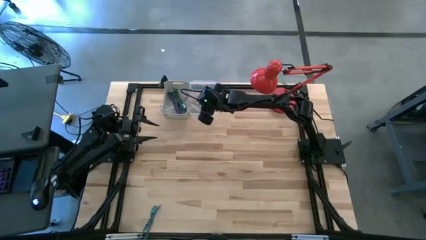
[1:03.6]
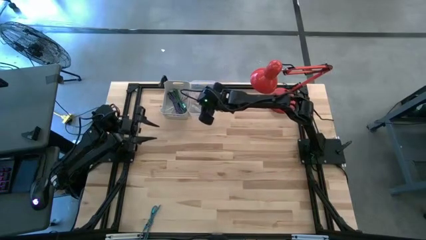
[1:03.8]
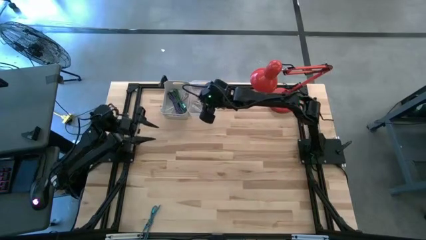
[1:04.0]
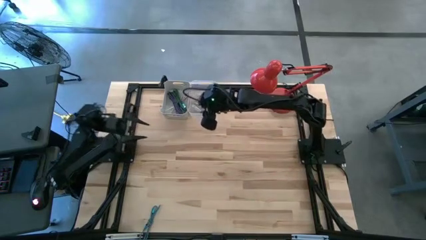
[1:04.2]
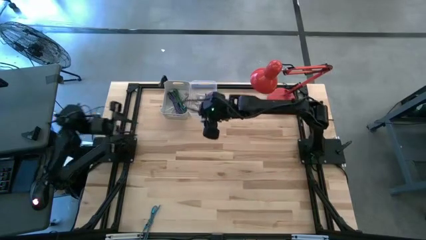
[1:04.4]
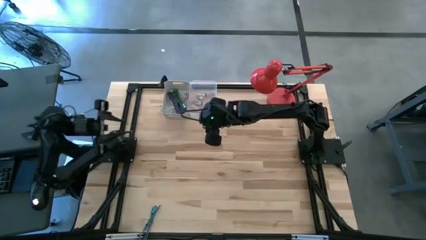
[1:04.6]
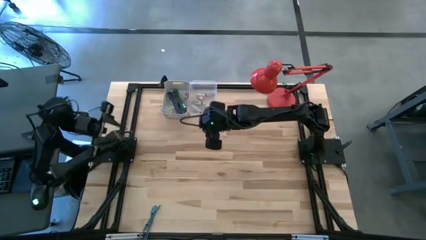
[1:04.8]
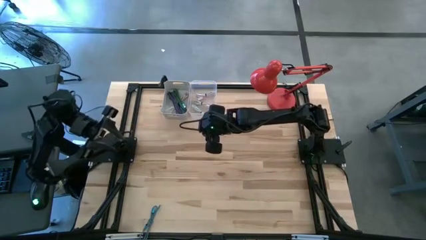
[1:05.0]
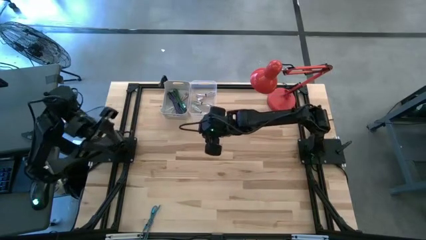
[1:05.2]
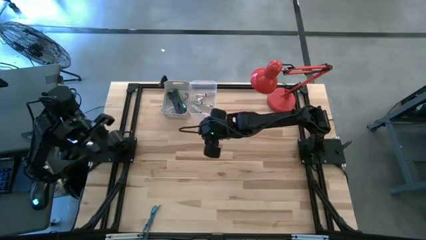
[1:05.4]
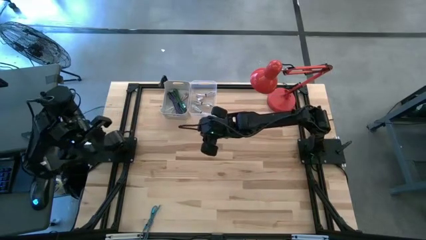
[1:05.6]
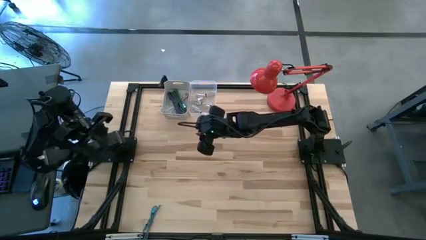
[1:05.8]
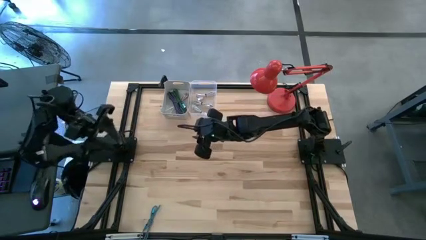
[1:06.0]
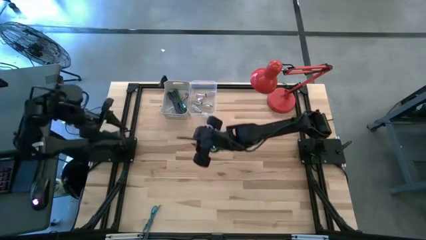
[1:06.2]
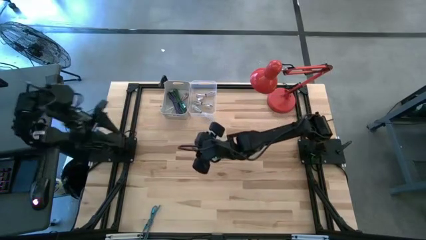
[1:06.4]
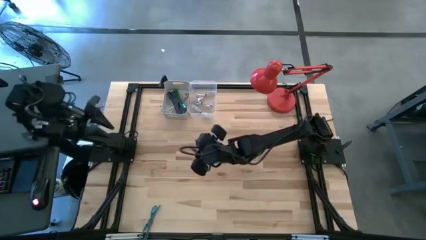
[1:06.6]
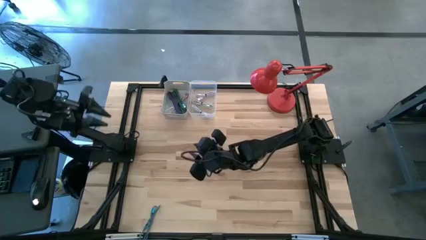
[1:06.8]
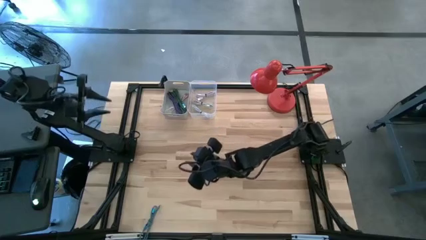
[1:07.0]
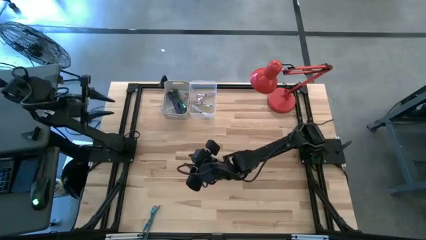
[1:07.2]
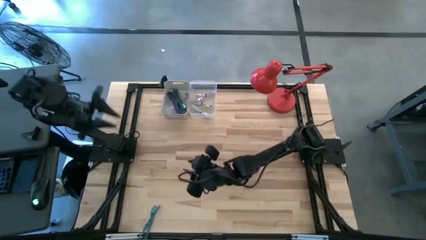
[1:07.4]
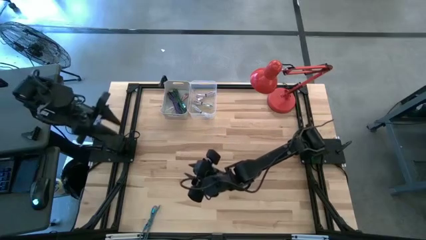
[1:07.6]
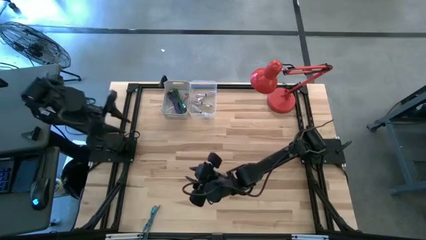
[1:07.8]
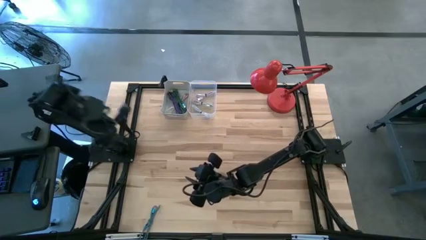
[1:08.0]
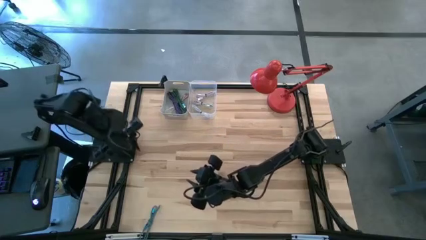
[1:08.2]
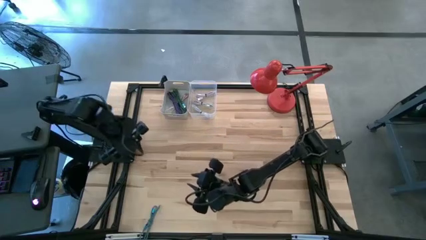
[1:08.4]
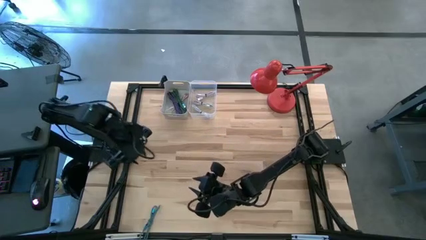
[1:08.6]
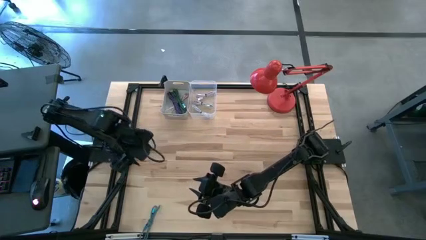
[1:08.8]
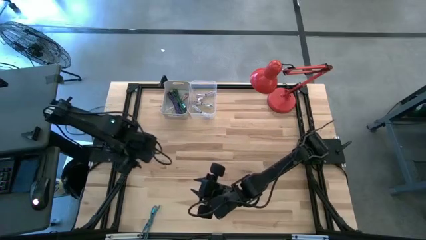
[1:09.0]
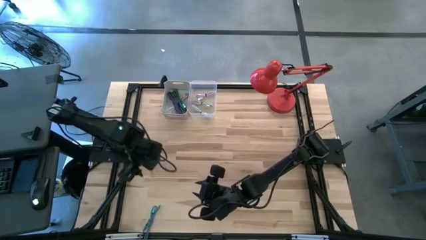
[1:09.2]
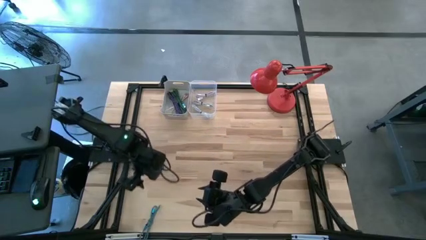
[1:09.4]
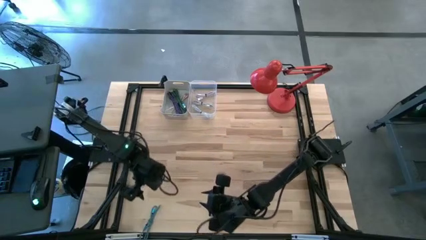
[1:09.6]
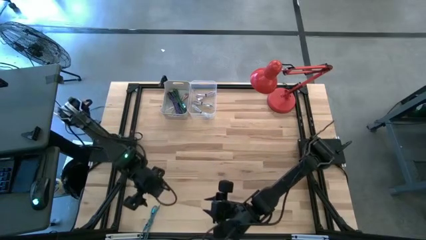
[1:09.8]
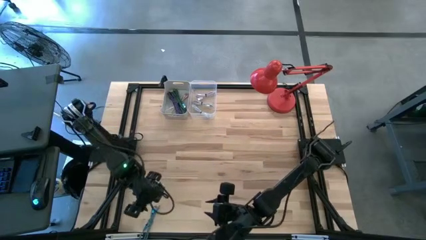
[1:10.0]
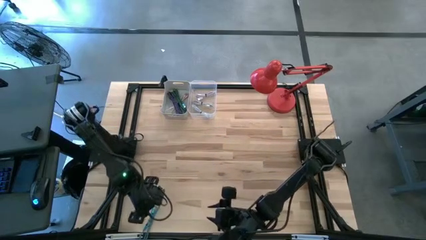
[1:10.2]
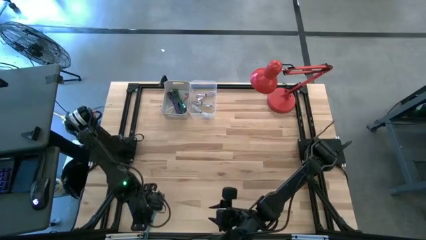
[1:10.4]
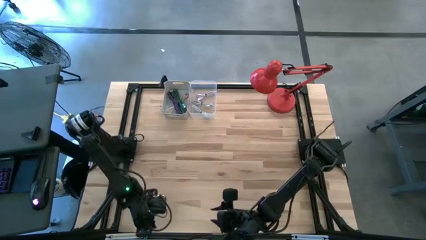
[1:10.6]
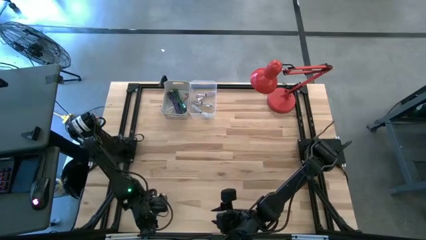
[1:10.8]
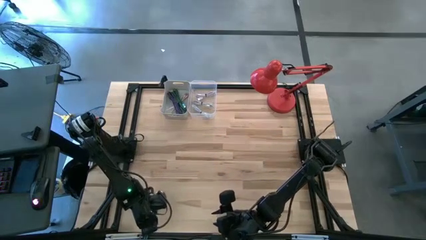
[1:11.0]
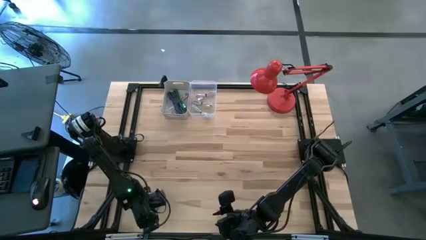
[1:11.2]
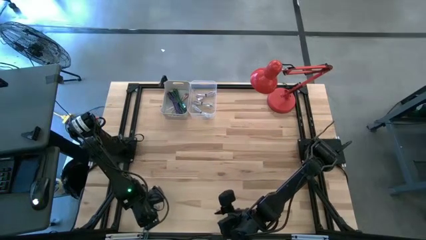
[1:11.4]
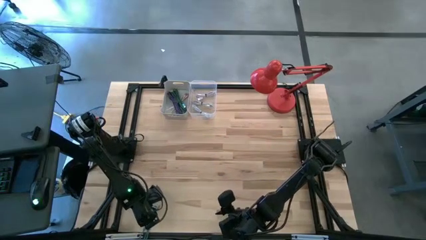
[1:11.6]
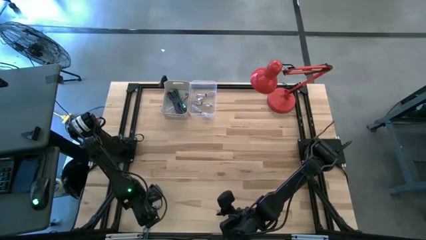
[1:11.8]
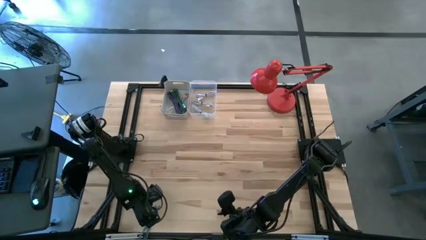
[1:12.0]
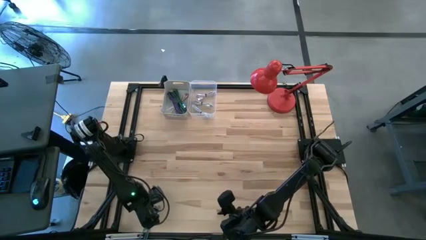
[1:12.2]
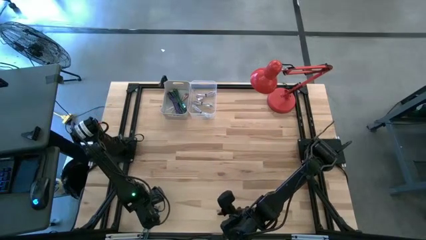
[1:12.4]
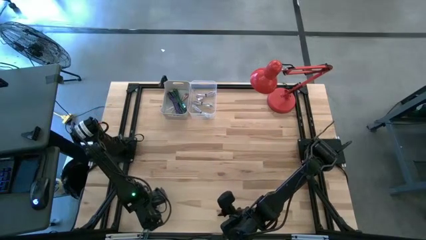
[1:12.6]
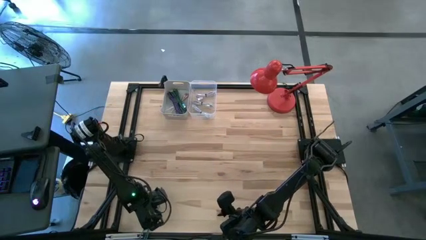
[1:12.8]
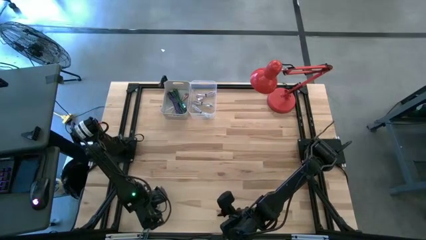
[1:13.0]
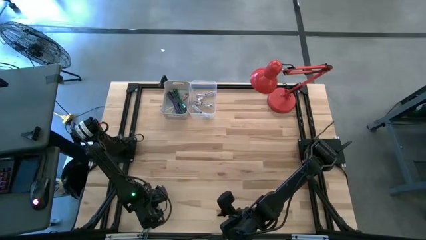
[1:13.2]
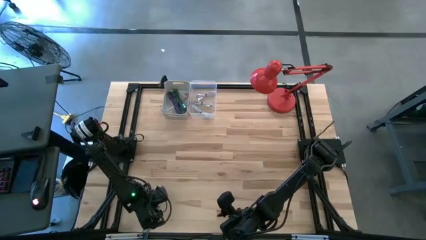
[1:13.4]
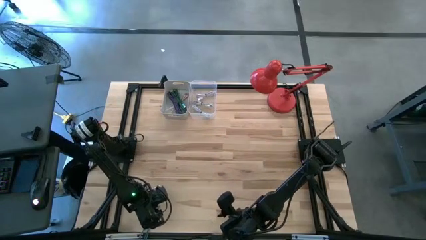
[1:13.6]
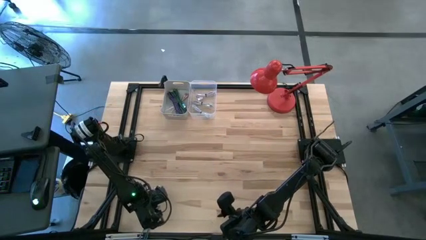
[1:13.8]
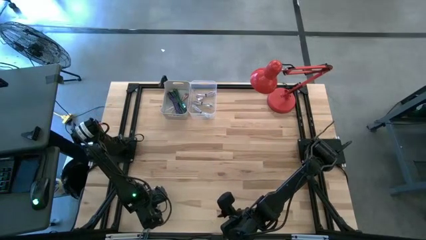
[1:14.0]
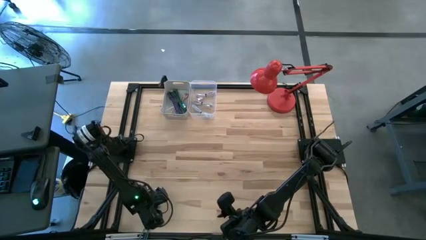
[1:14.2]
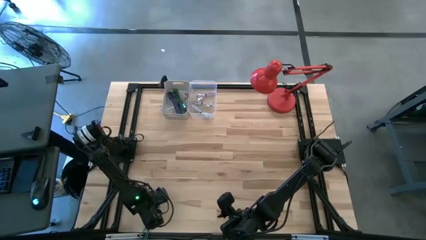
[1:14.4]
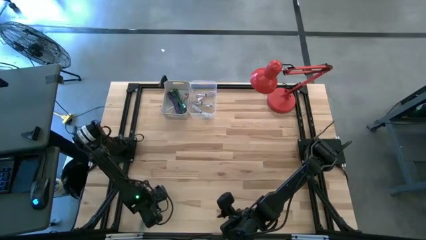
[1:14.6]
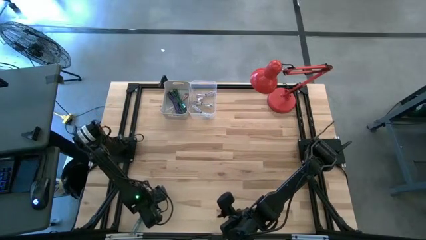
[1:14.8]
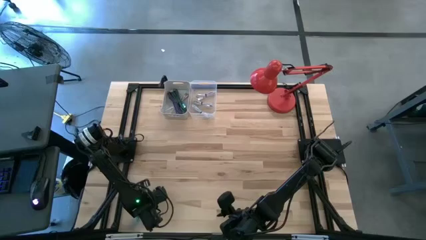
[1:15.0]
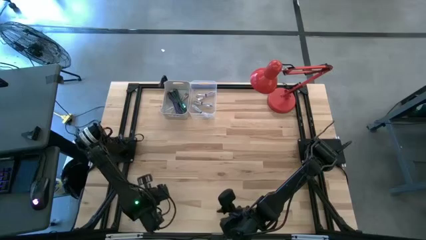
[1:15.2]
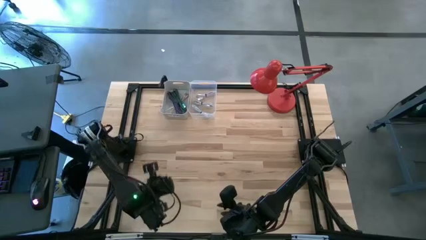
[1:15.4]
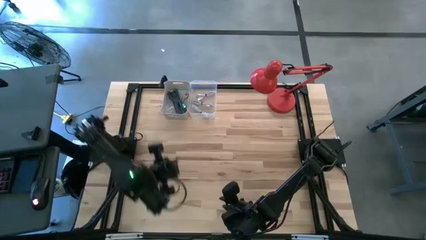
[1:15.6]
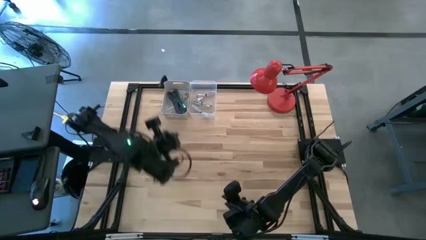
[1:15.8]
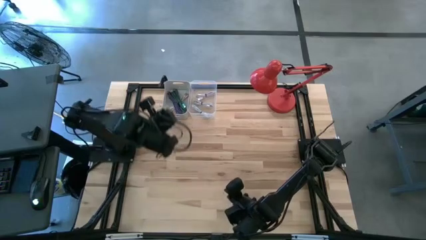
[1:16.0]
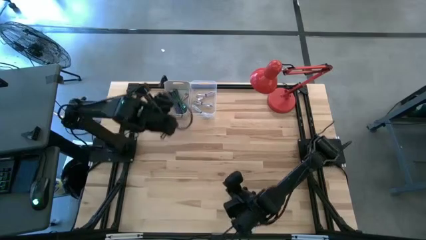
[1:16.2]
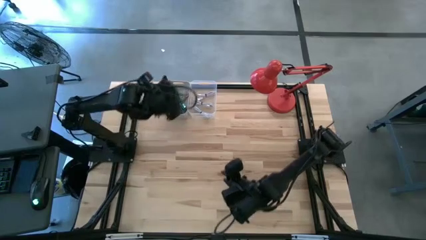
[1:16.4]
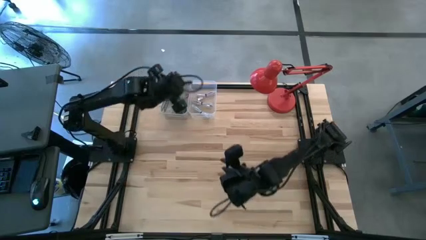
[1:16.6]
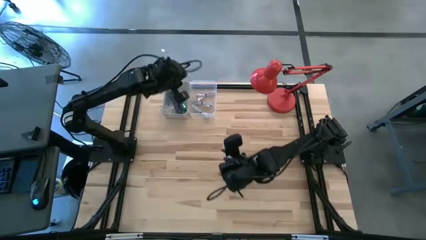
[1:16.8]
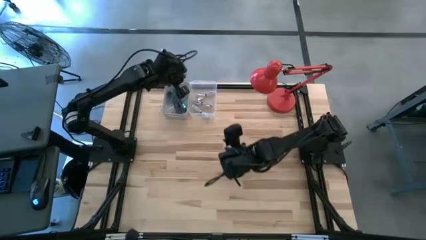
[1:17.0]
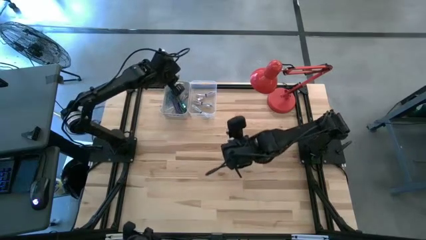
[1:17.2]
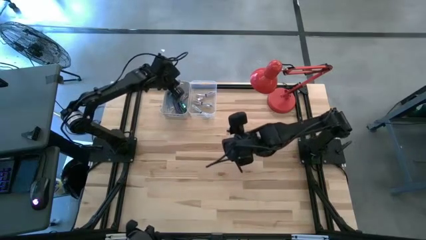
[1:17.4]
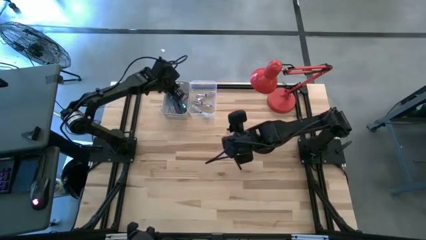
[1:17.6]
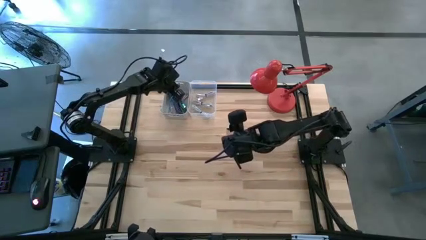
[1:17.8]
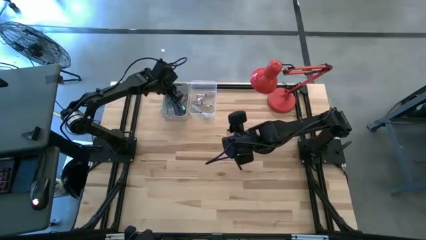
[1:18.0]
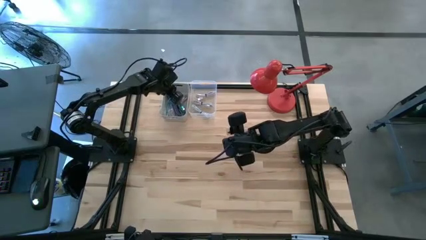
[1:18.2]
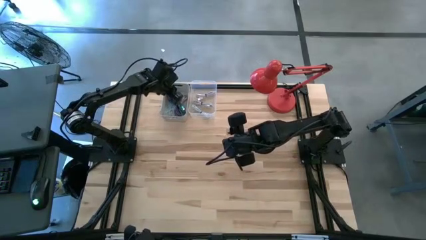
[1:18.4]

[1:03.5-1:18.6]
Task: Pick & Place USB Port
Put the light blue patterned charger cable into the gray bin

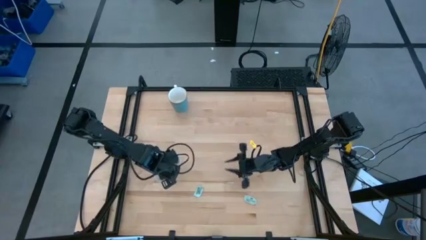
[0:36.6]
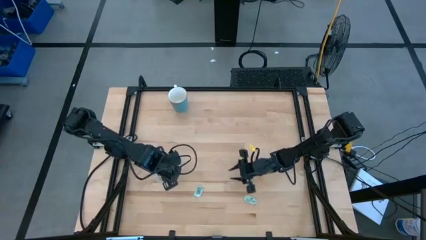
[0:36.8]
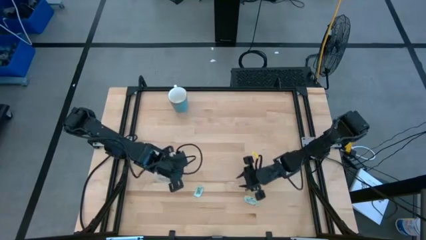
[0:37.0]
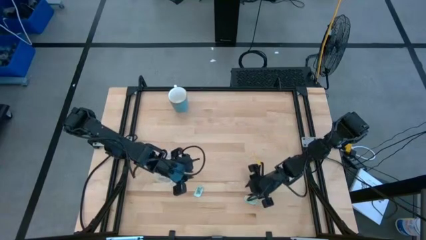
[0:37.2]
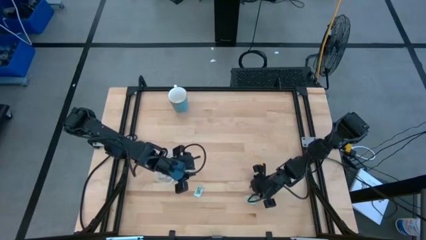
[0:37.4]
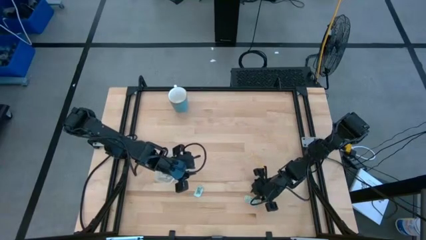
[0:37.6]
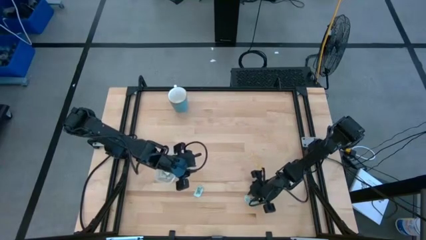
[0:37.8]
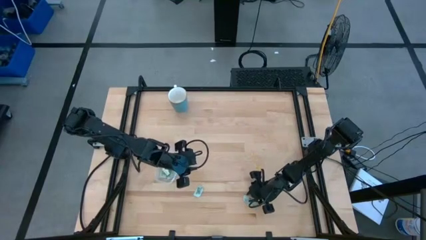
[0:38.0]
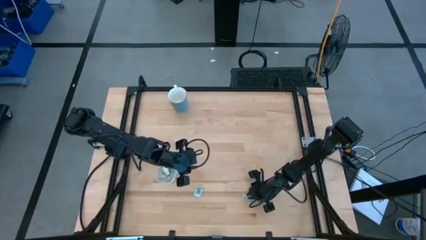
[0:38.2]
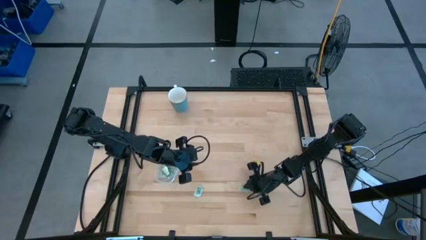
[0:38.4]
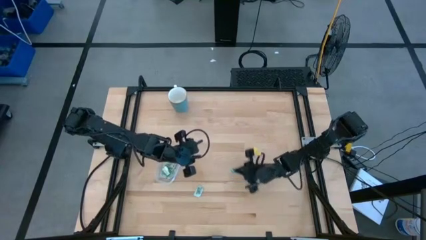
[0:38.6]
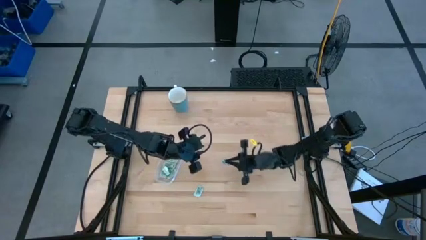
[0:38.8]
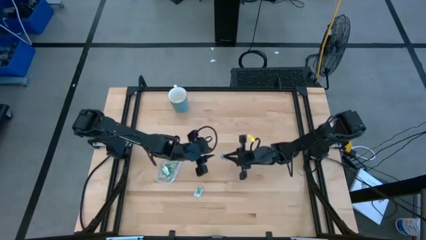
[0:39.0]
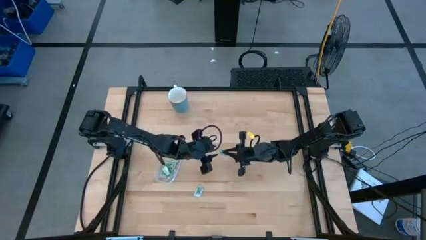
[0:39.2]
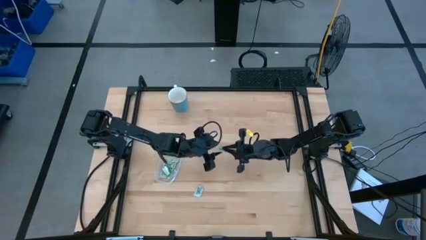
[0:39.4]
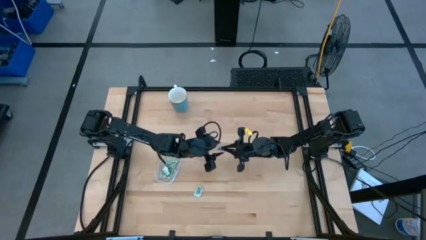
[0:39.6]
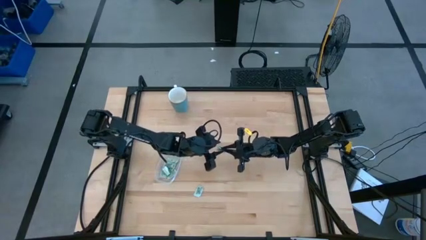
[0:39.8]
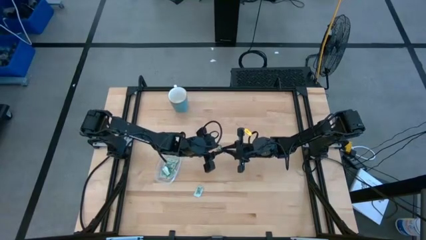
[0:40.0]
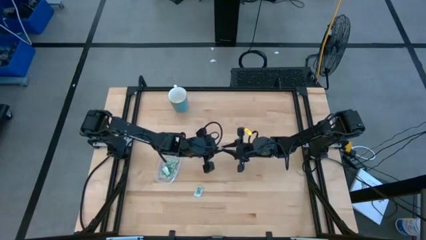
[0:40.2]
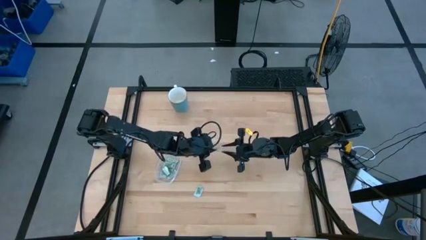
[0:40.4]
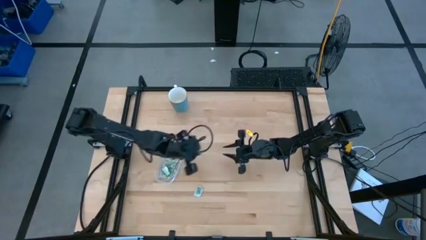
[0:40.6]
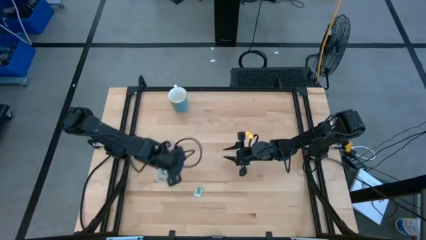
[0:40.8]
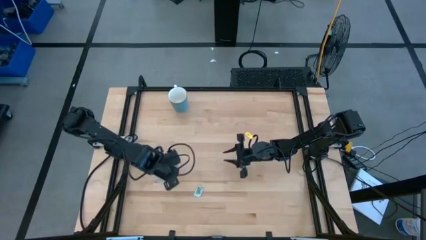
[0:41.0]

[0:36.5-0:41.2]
Task: Pick and place Stevia / Truvia into bins
Put the stevia packet into the transparent container
